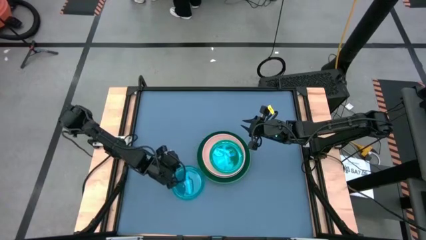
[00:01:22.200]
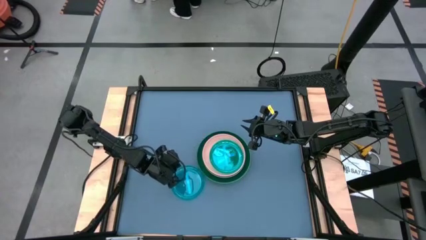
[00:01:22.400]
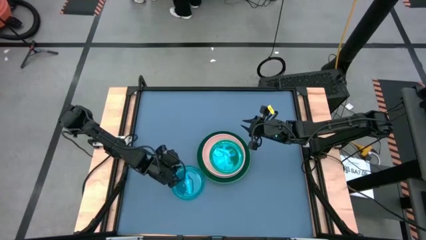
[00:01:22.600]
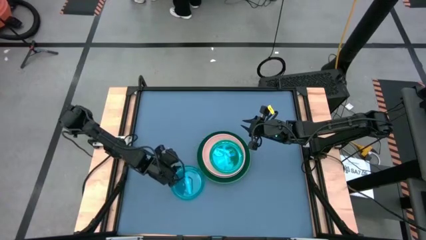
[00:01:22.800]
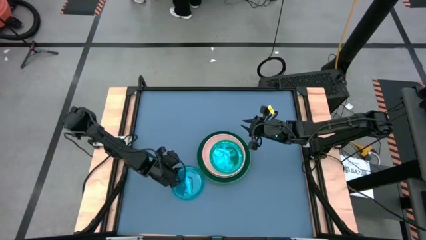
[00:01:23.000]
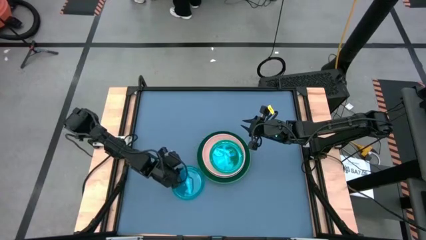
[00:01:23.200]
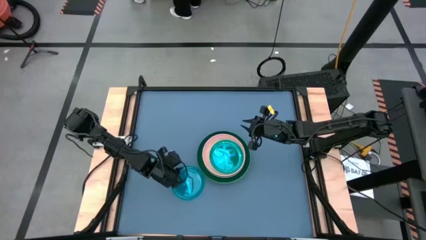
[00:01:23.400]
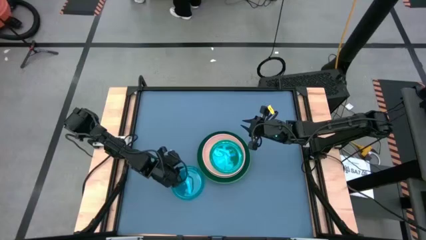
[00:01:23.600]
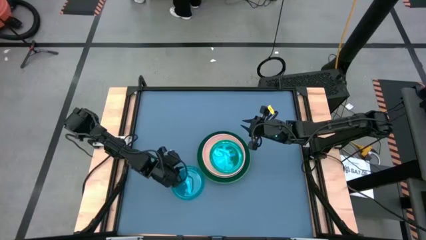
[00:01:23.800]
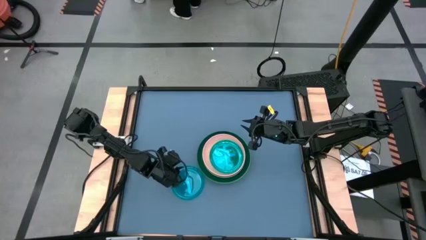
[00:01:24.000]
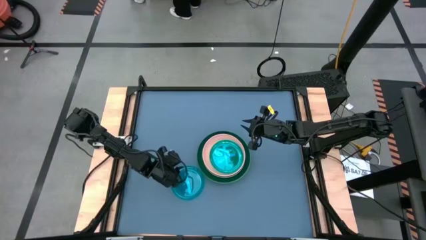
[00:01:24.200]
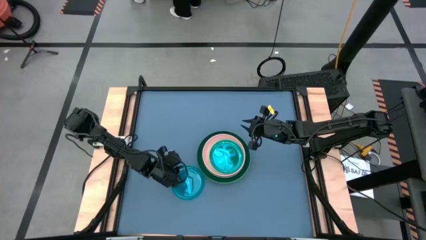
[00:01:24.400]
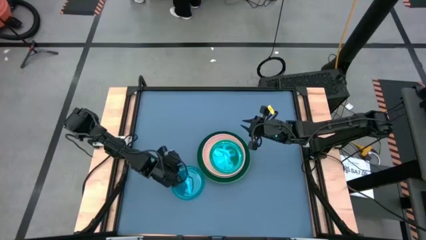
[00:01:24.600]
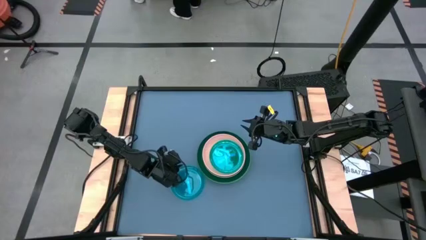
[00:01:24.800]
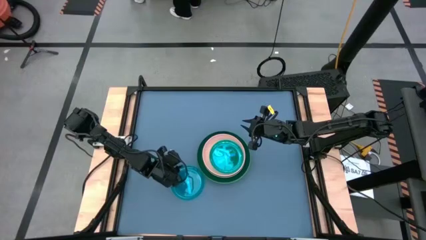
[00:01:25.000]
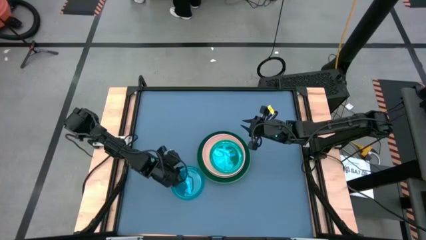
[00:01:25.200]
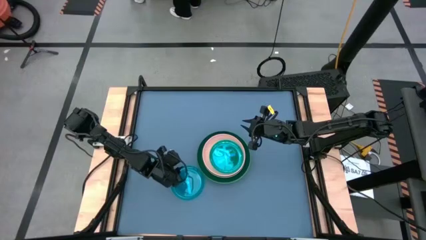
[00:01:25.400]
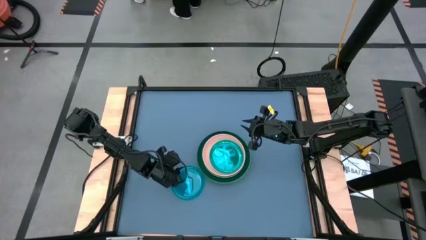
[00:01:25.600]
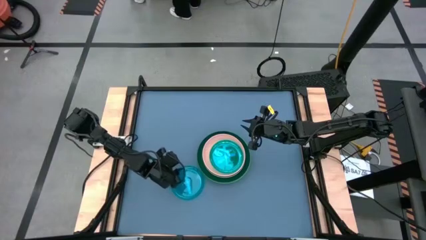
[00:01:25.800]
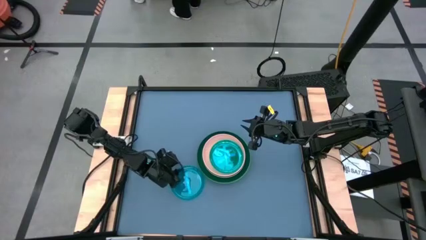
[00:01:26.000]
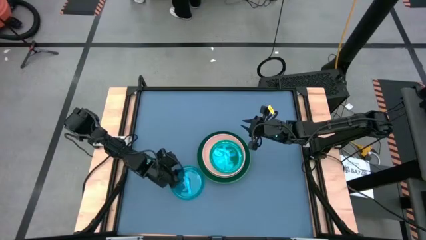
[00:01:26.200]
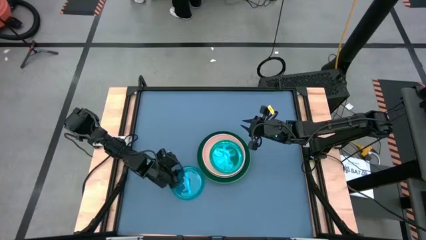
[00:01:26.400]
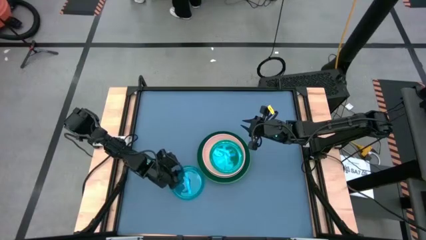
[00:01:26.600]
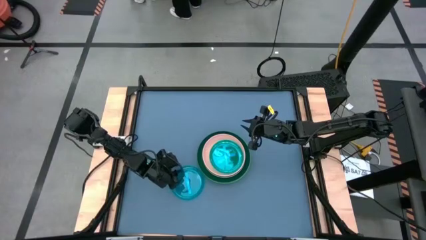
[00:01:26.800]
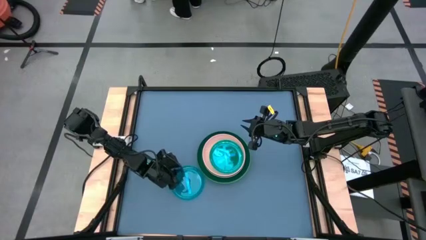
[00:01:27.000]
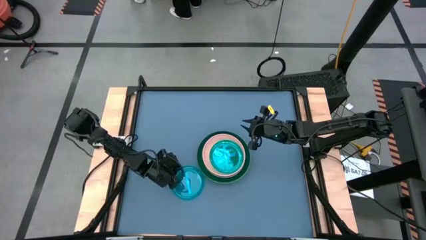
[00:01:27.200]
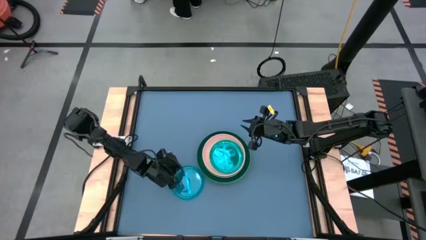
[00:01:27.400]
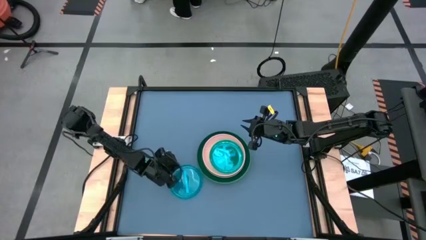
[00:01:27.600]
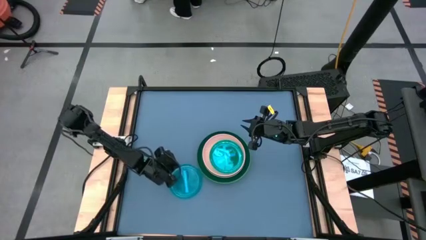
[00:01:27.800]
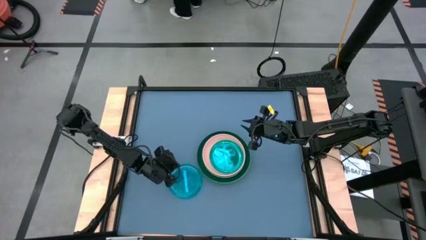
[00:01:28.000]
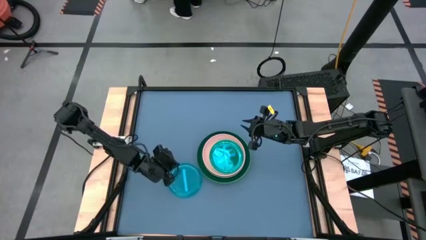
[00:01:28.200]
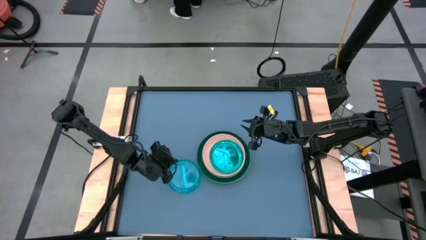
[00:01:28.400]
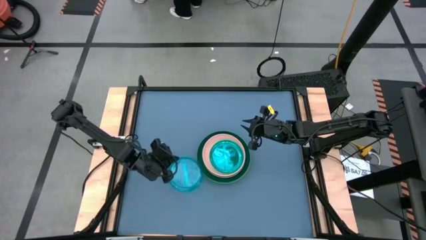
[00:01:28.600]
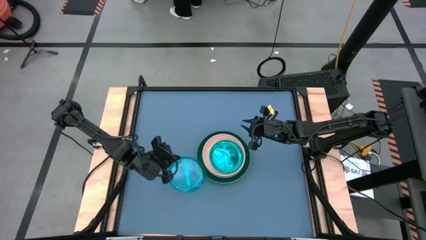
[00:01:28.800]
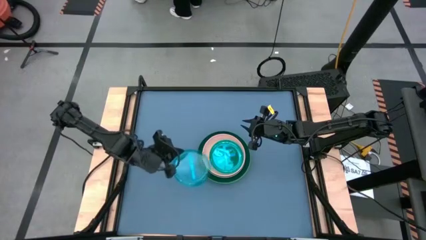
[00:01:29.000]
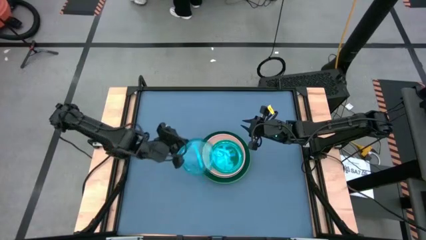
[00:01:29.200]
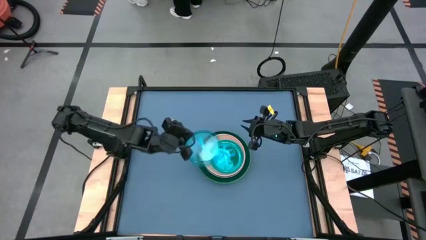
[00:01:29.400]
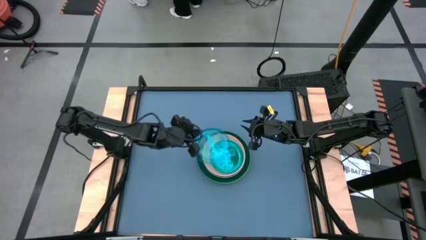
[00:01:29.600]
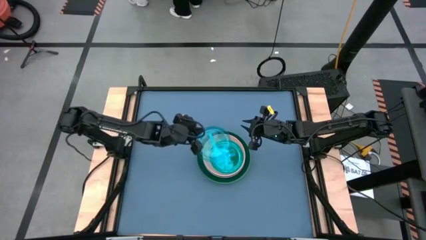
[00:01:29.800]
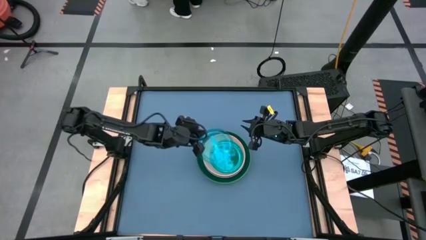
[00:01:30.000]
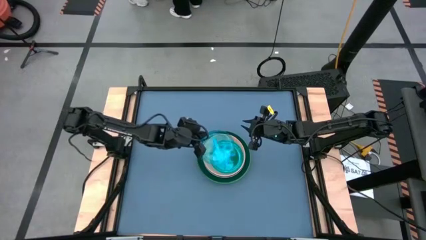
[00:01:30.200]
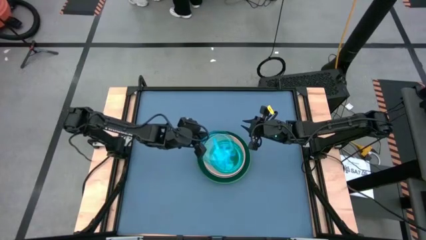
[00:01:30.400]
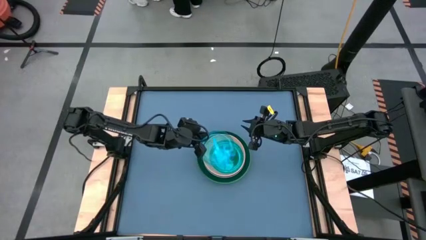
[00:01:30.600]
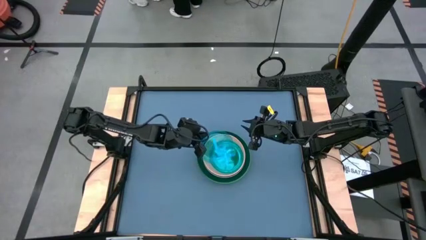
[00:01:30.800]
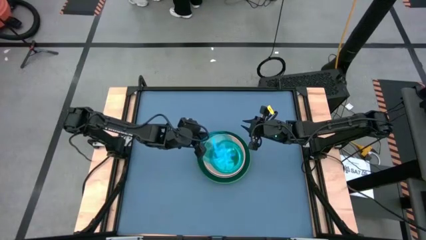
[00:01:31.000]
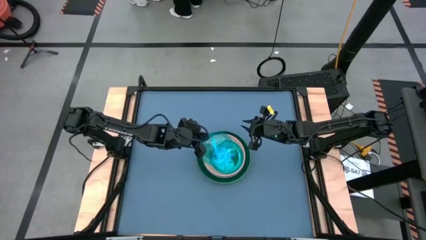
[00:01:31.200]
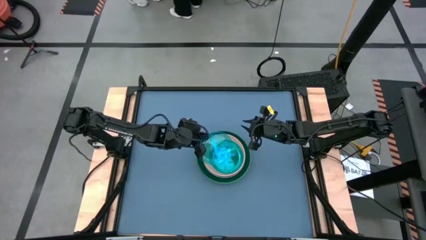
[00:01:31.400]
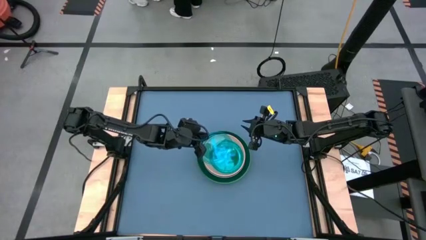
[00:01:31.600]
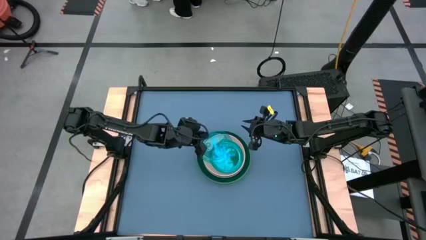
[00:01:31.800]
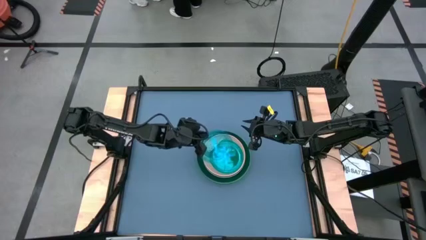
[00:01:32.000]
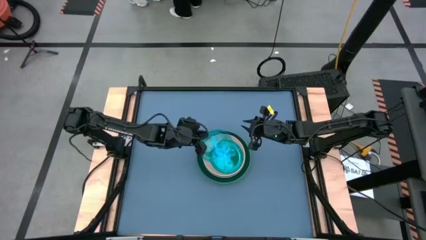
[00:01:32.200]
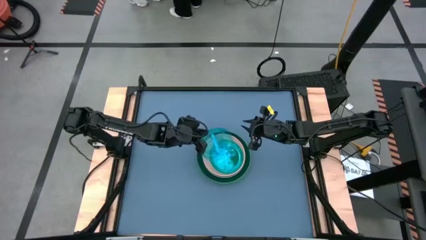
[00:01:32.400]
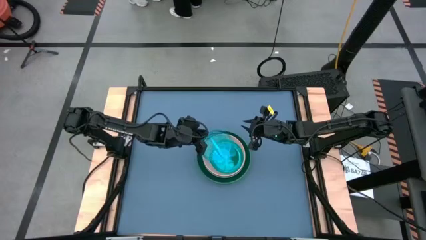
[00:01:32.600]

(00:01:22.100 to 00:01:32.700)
Task: Stack plastic plates
Stack the blue plate on top of the blue plate

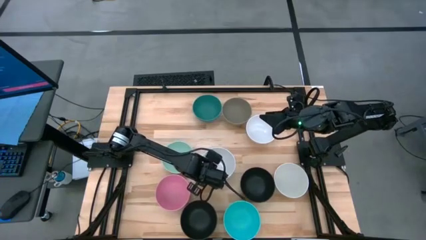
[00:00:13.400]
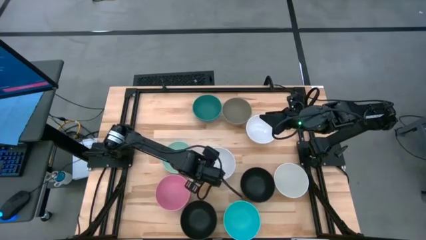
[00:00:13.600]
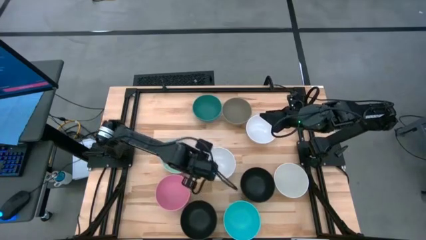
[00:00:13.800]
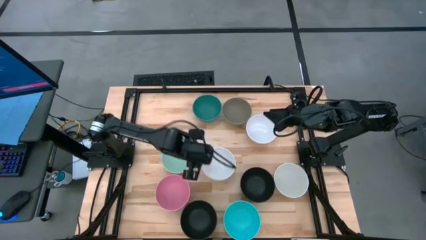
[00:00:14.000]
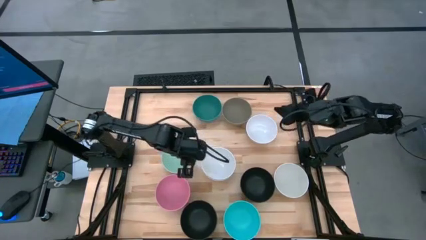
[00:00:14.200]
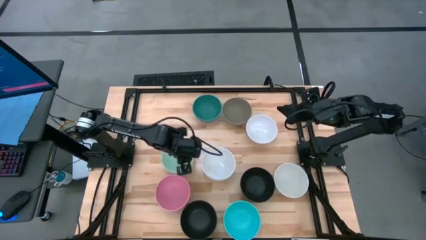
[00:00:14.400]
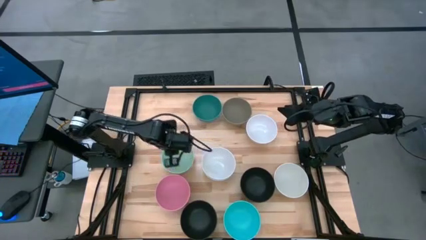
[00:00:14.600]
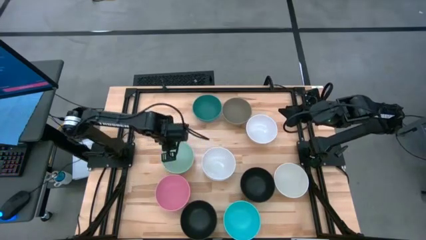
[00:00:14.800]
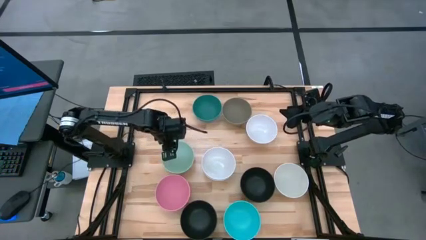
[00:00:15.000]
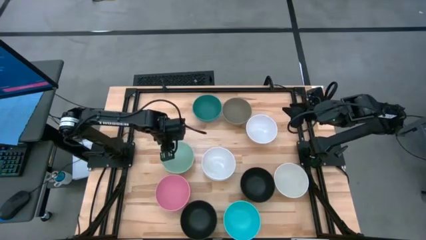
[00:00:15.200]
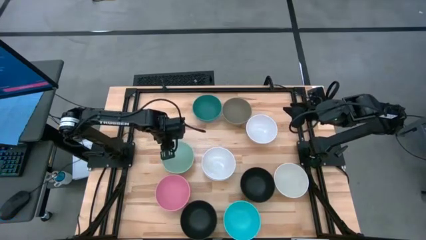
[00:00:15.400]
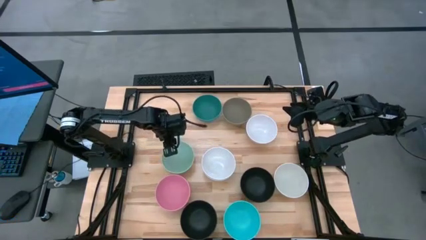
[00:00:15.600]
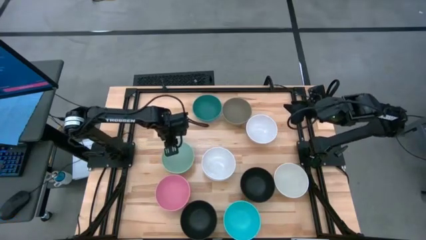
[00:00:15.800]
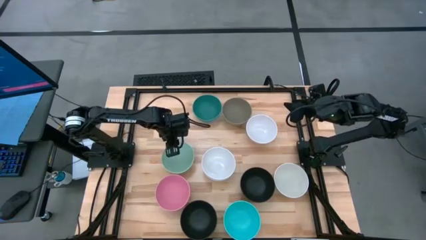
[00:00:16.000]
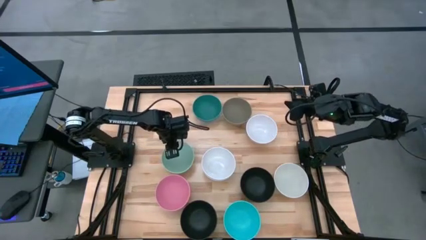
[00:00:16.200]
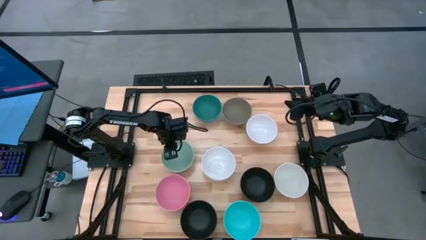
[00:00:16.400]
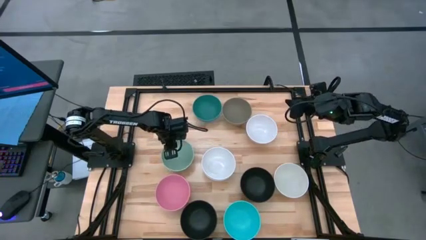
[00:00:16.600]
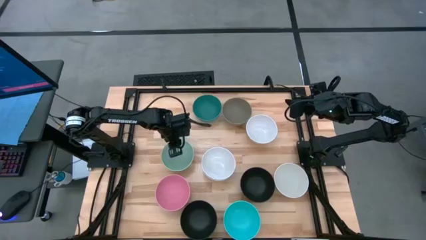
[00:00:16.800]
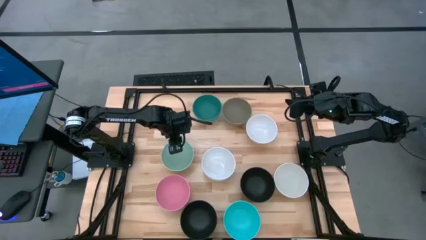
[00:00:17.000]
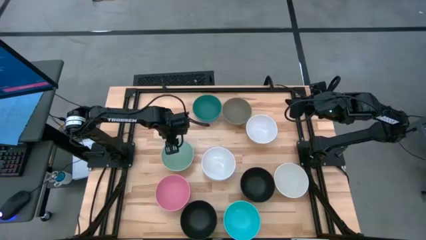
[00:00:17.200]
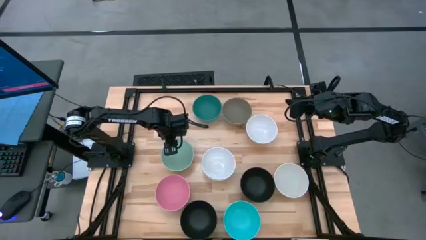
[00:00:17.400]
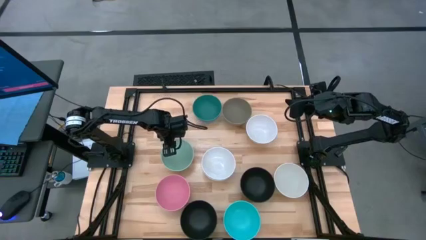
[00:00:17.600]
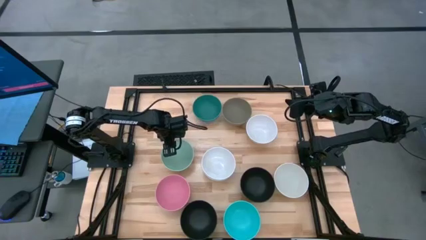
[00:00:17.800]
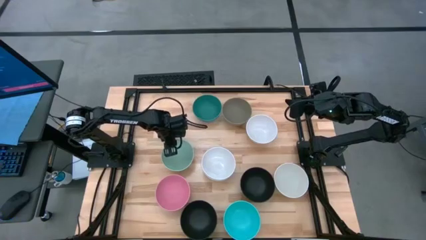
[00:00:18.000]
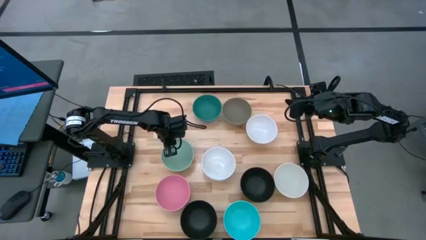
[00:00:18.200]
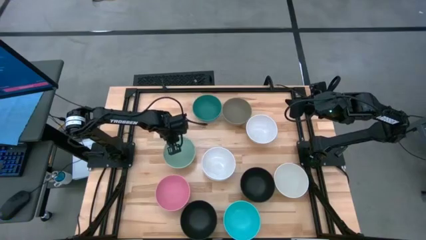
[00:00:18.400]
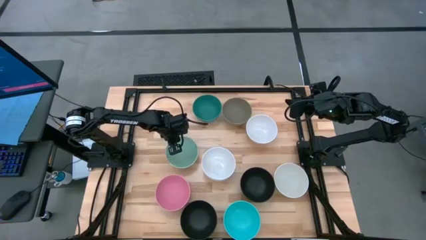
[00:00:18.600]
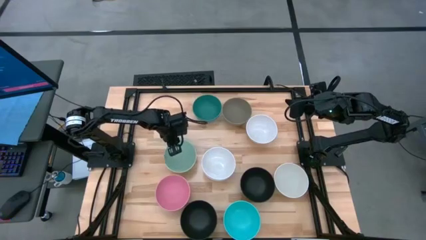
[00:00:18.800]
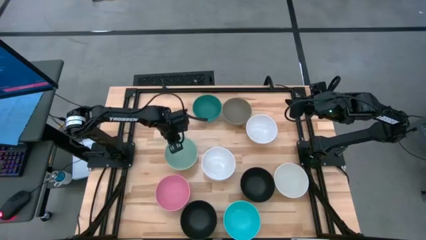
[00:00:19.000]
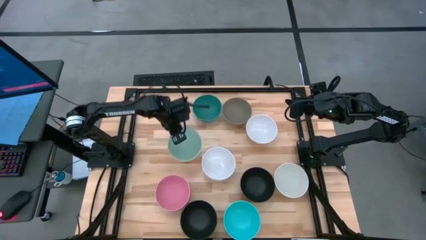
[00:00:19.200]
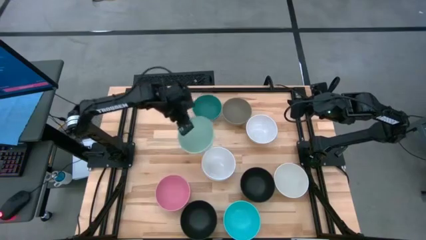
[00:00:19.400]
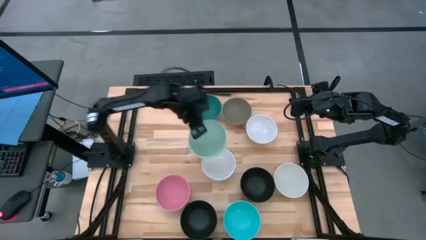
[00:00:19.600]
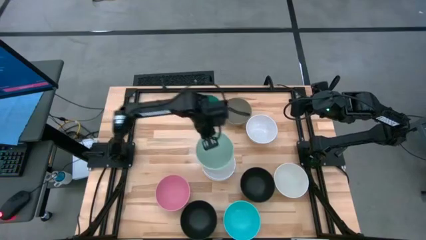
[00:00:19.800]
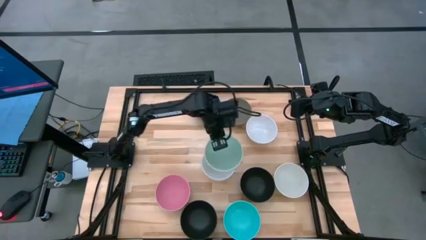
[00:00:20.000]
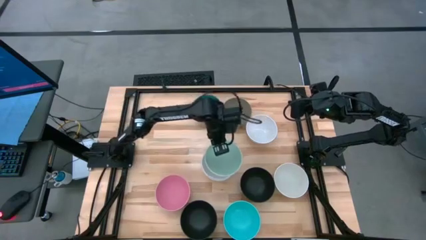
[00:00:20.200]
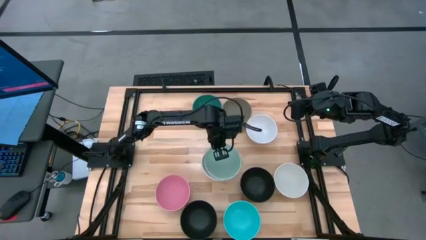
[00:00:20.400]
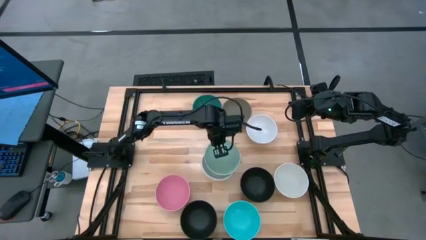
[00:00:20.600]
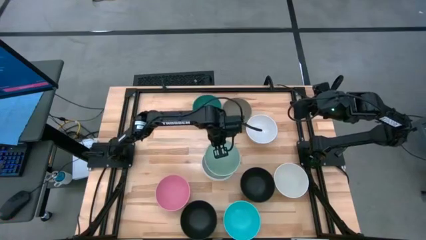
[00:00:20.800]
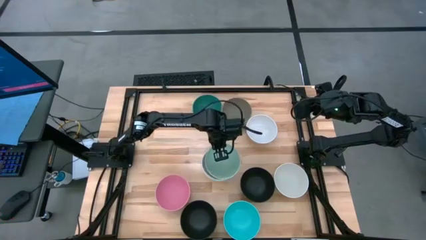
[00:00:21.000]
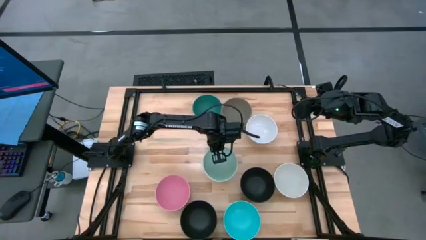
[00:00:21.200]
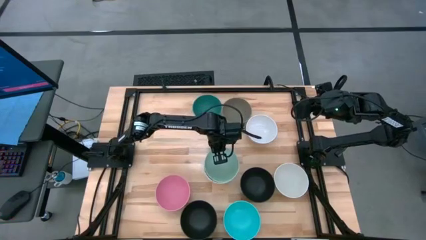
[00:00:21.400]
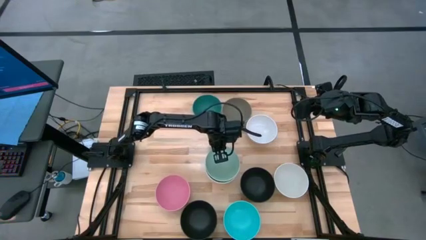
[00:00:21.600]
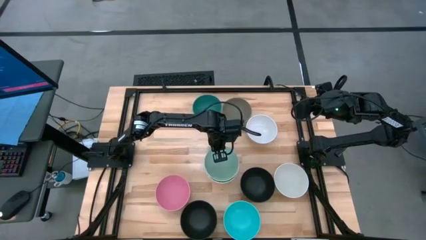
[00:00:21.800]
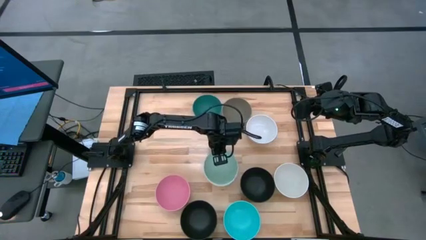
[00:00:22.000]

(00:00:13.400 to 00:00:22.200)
Task: Nest bowls inside each other
Stack the green bowl on the top of the white bowl
